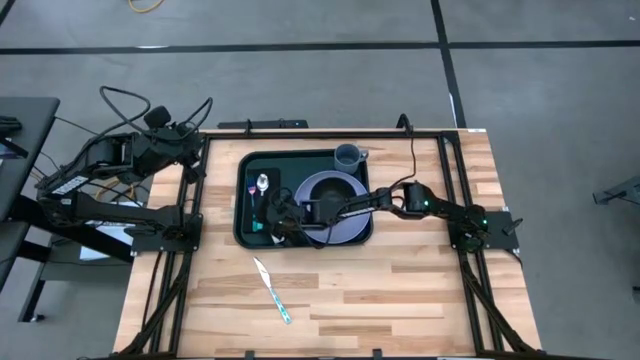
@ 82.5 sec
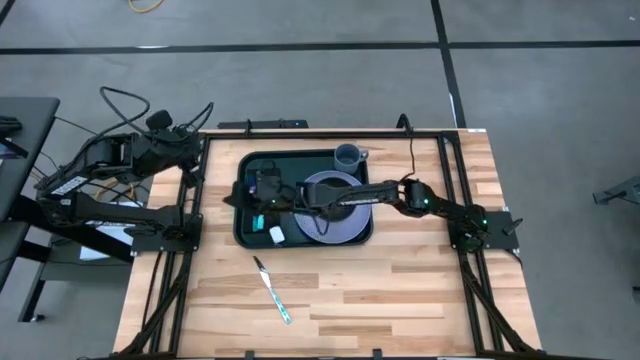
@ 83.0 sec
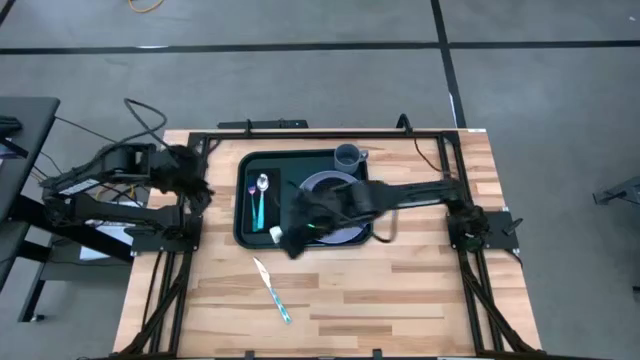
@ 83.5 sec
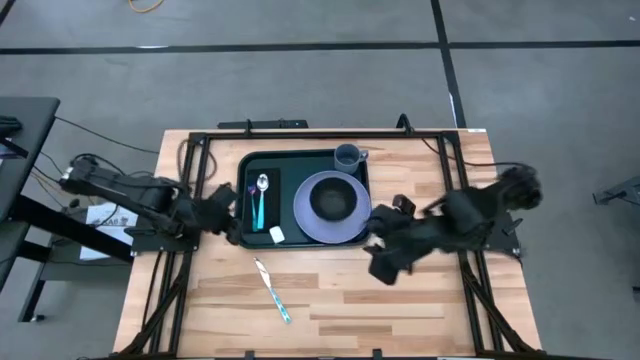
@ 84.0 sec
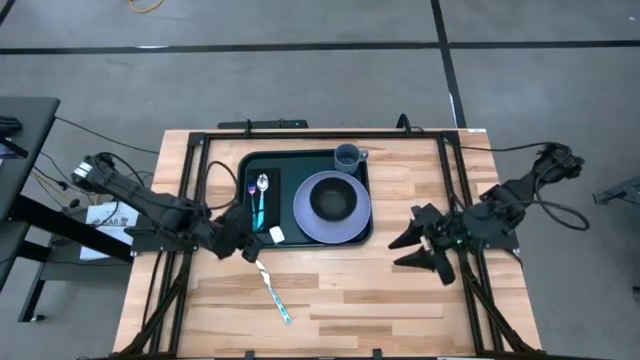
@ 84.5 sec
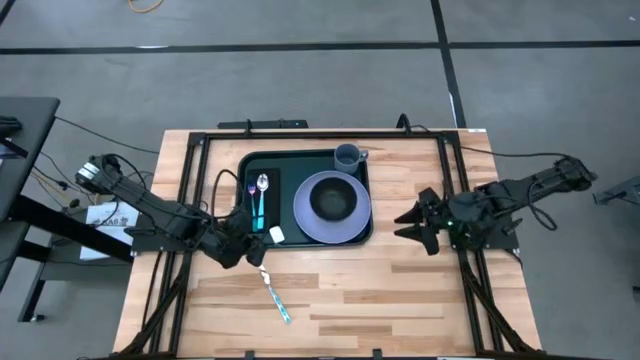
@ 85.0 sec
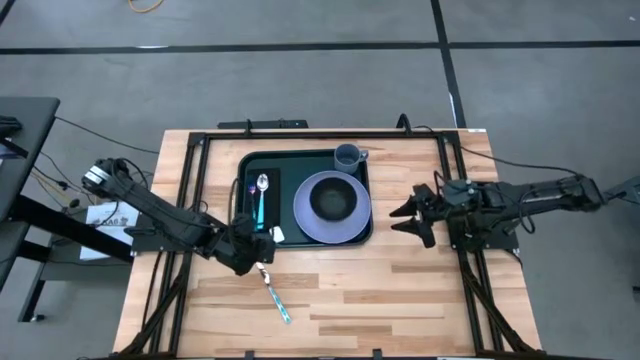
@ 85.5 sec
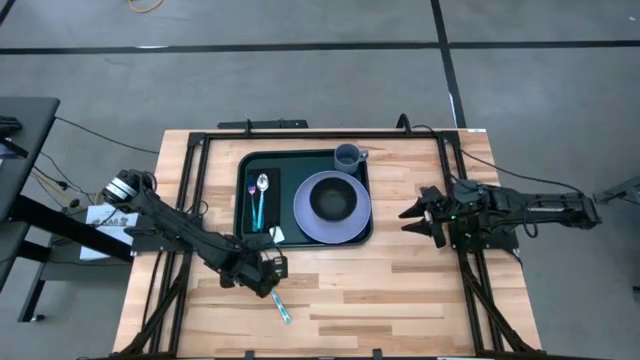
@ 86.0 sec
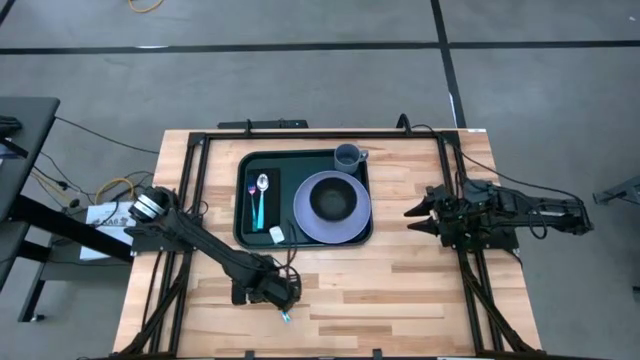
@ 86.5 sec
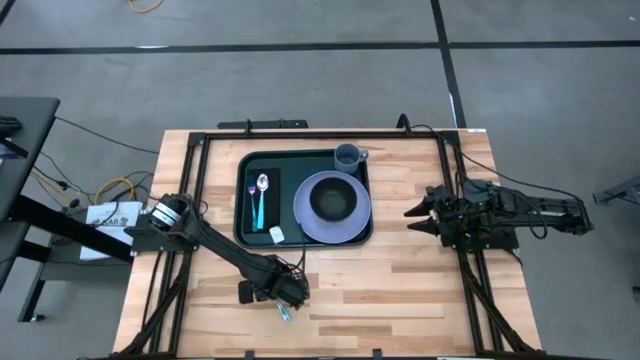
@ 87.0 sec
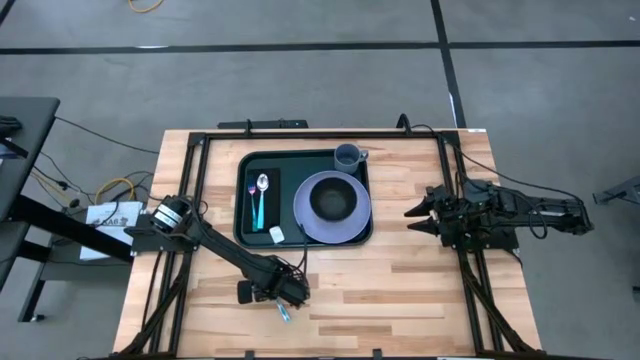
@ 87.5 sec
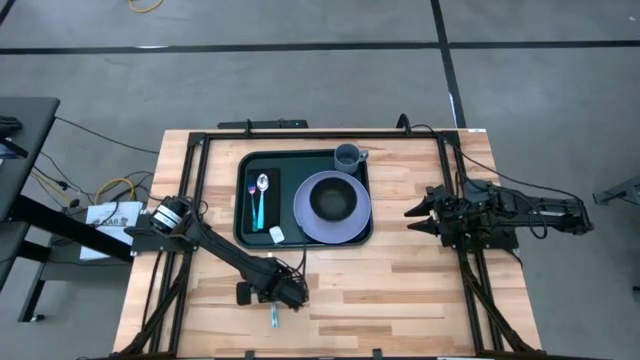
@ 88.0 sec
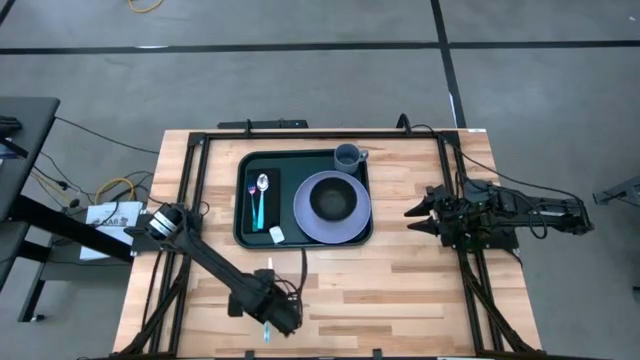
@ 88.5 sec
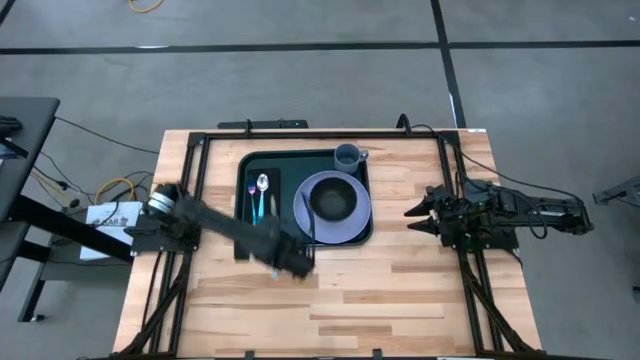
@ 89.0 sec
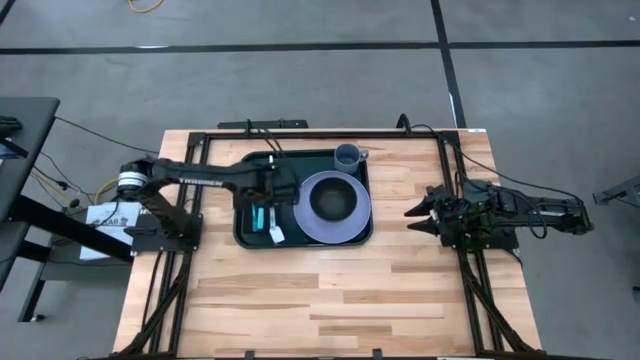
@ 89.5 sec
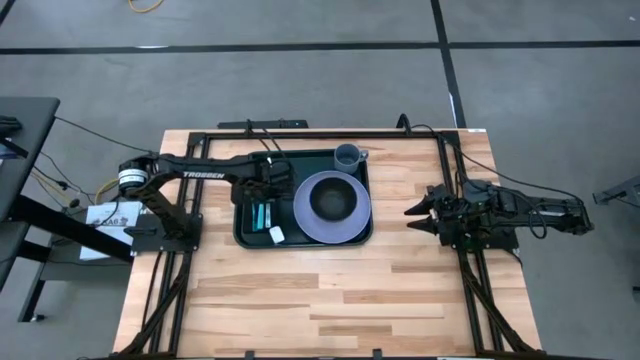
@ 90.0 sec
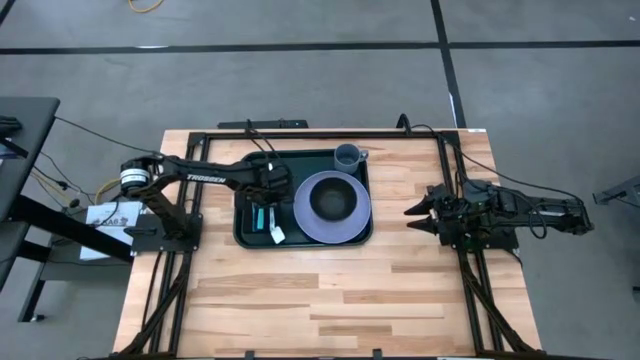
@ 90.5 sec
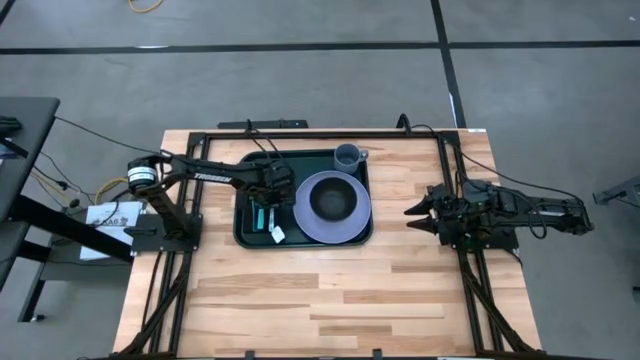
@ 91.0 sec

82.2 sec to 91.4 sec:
Task: Set up tray
Put the blue table knife on the black table napkin to the right of the blue spoon

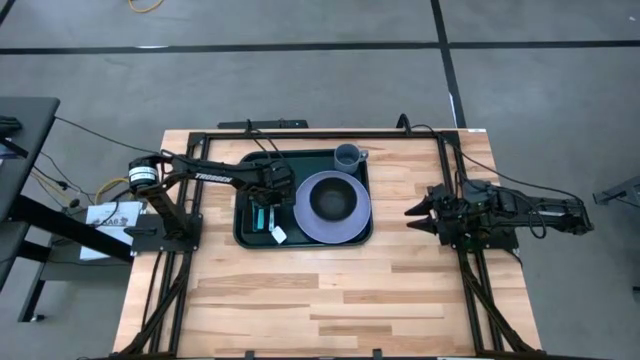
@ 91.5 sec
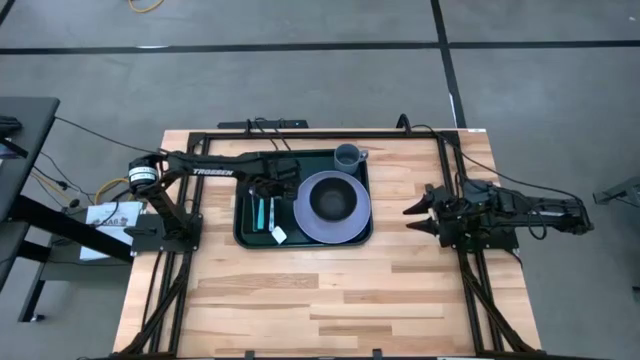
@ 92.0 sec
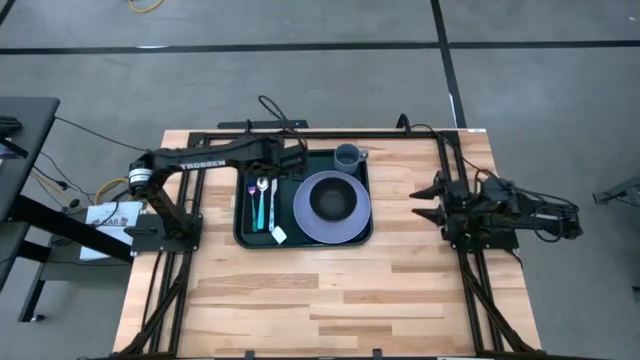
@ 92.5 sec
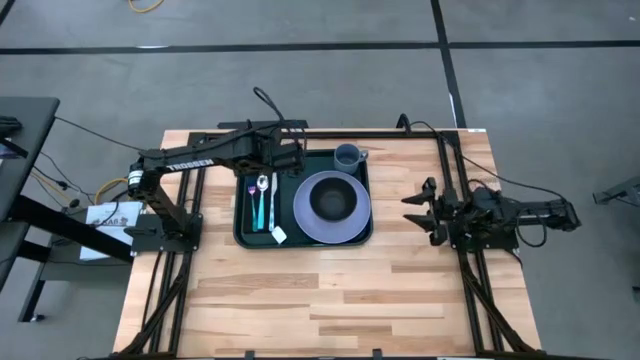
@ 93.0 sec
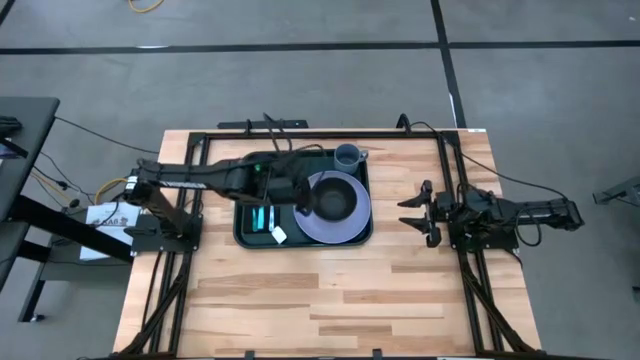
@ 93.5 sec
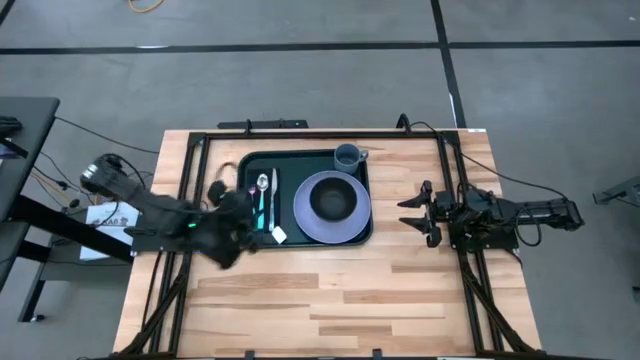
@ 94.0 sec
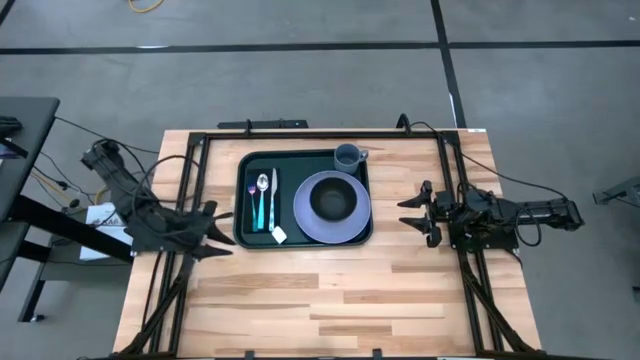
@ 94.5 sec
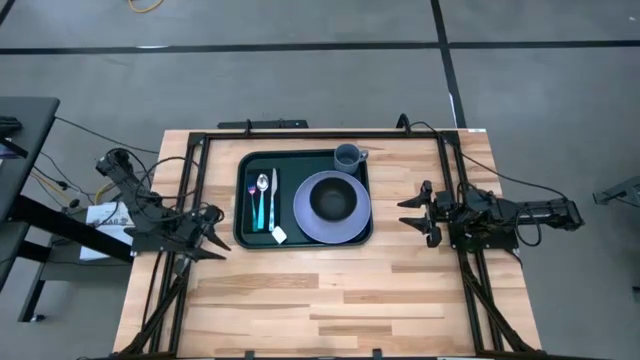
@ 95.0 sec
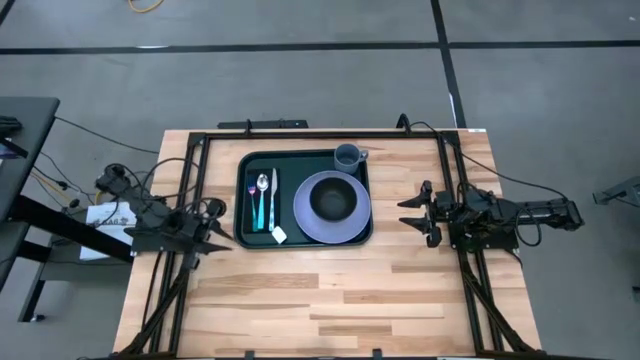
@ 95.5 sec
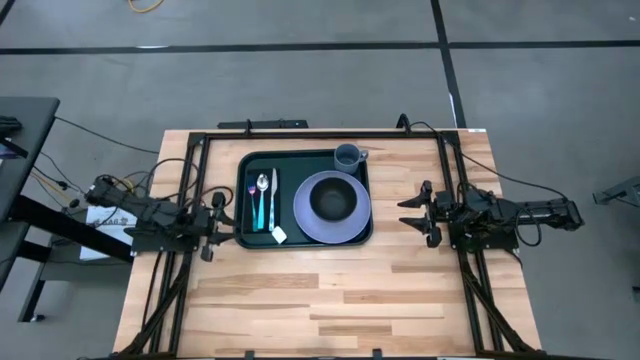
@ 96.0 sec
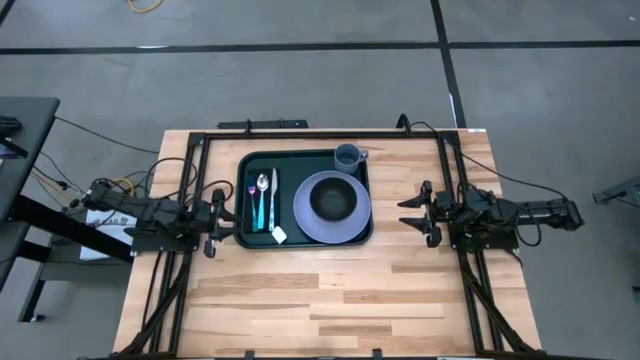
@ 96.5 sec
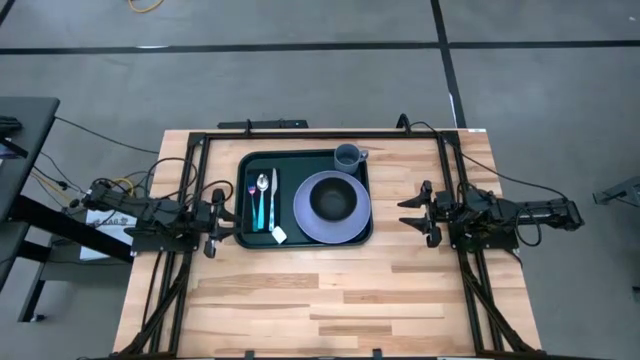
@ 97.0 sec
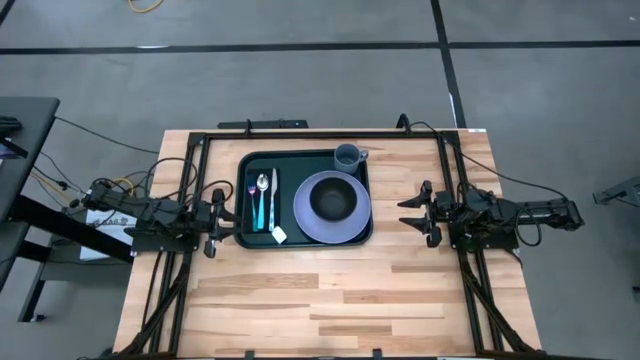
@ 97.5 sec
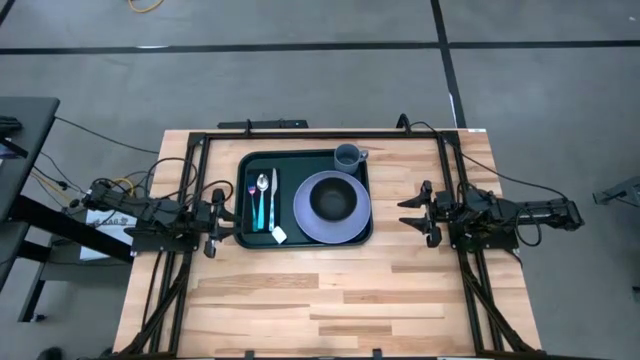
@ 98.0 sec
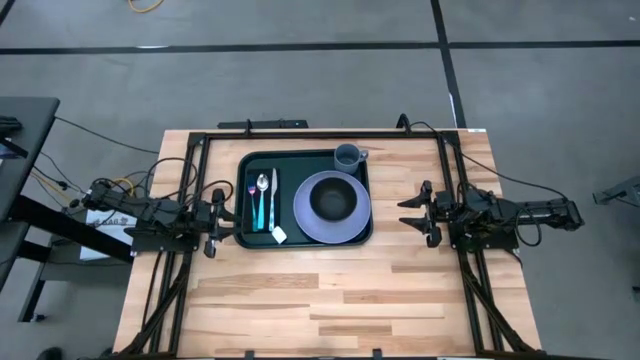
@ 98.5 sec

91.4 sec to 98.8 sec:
Return to Home Position

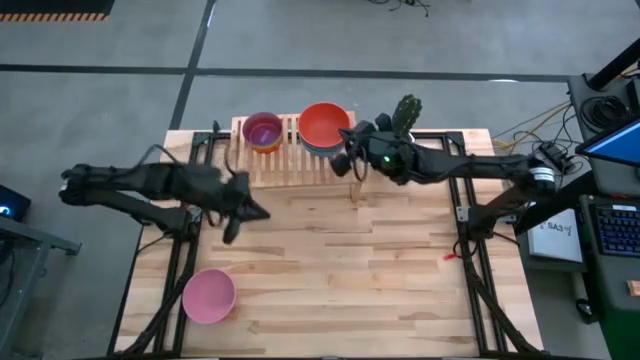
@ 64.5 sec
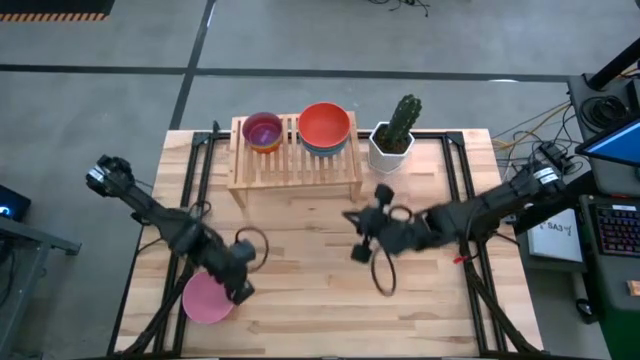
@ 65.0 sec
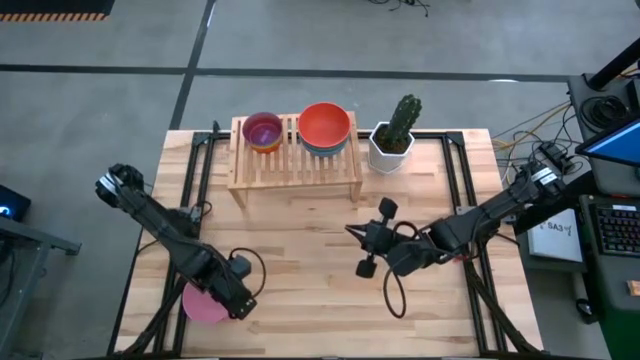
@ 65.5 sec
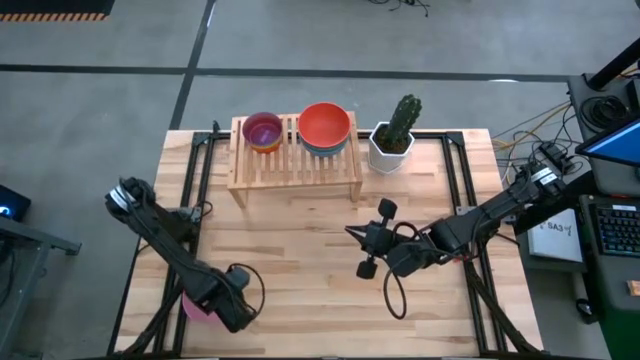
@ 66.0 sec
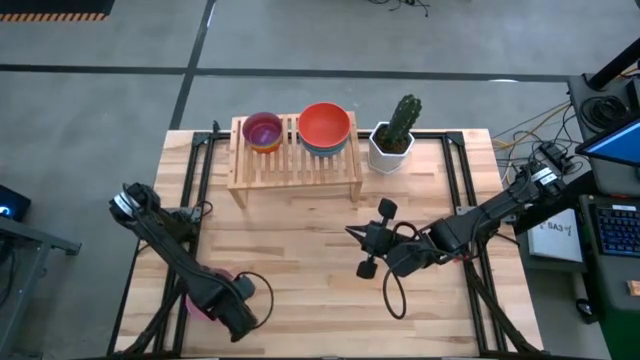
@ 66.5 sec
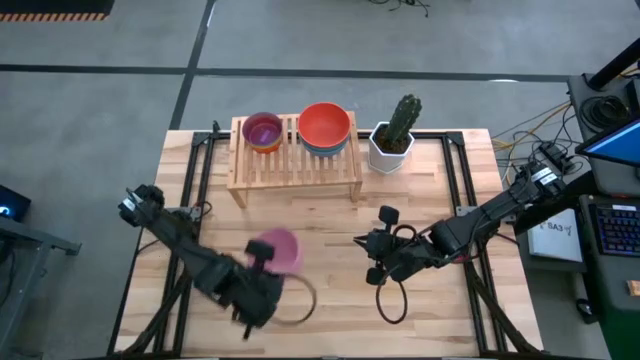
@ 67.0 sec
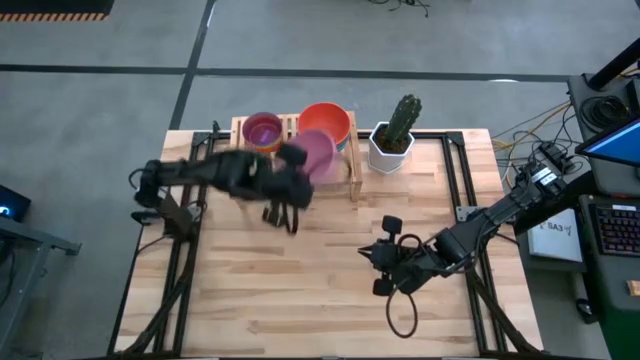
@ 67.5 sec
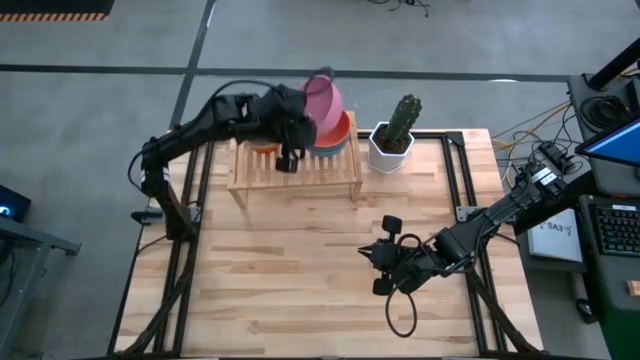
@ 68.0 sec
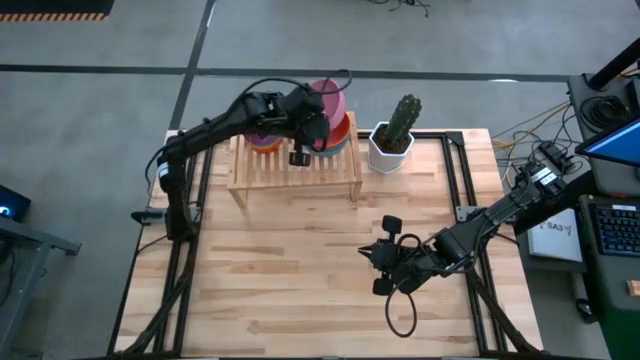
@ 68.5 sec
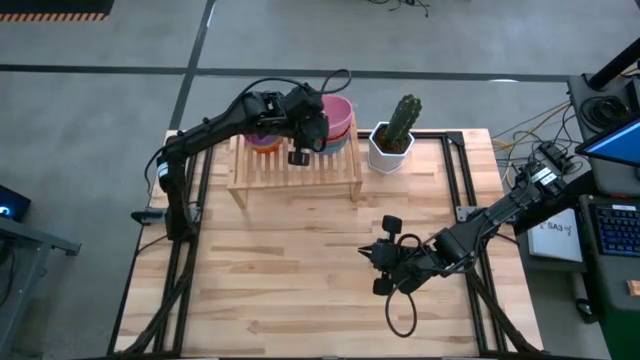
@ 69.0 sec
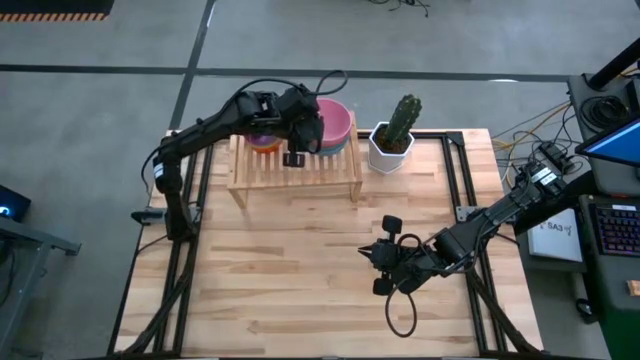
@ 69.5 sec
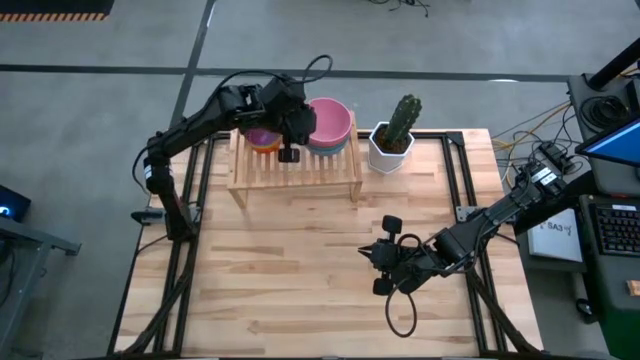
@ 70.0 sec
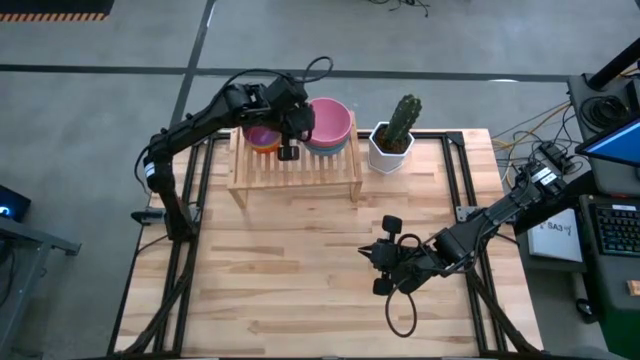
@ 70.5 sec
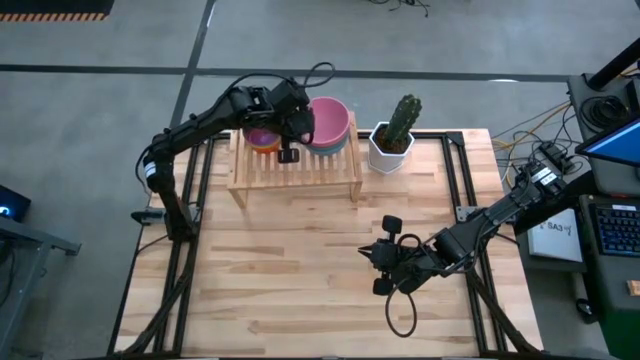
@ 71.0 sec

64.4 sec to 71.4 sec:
Task: Place and stack bowls onto a shelf
Stack the pink bowl on top of the orange bowl on the shelf
